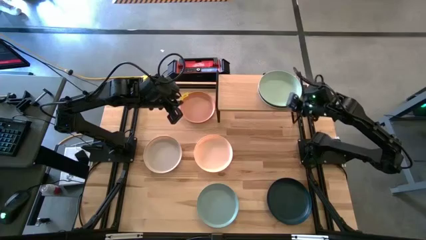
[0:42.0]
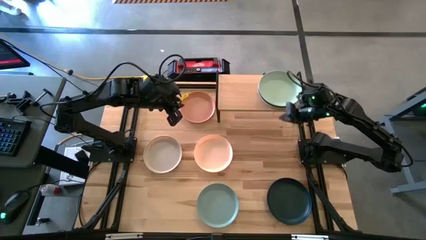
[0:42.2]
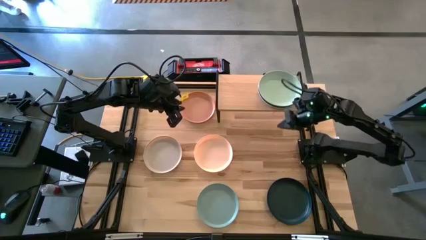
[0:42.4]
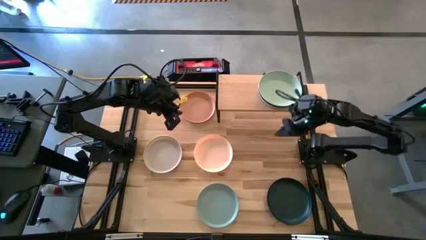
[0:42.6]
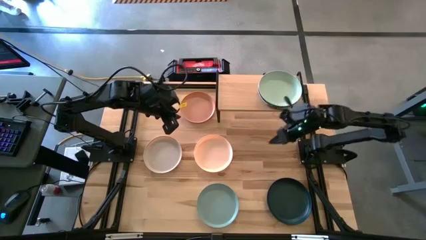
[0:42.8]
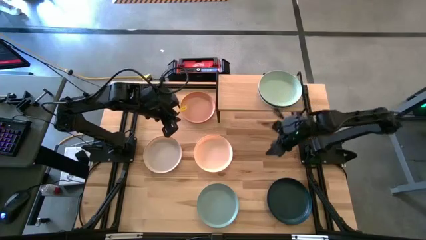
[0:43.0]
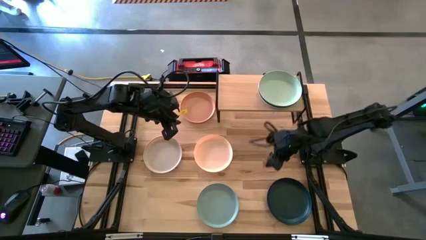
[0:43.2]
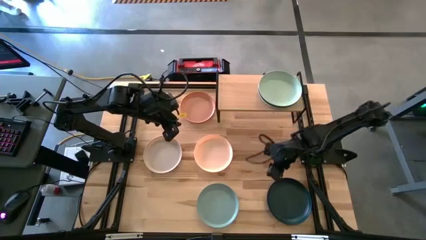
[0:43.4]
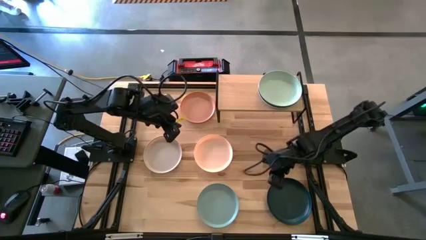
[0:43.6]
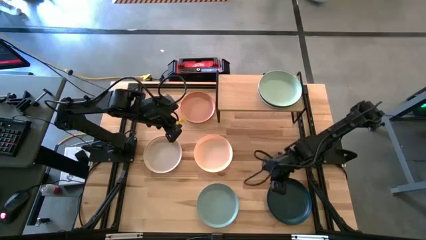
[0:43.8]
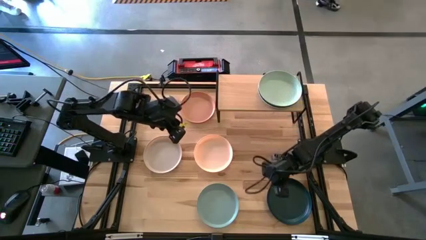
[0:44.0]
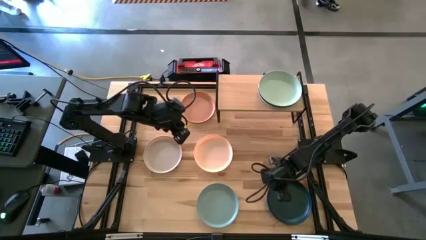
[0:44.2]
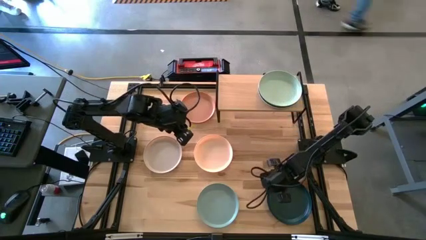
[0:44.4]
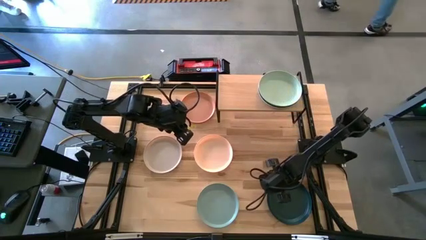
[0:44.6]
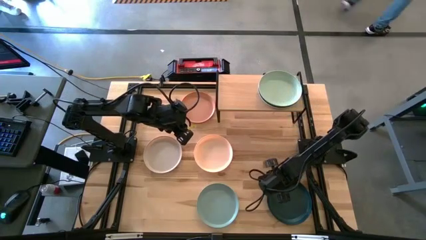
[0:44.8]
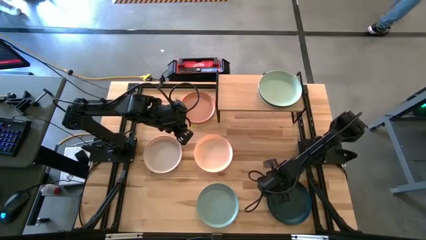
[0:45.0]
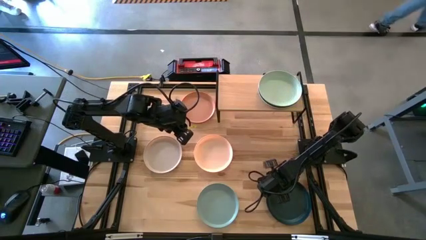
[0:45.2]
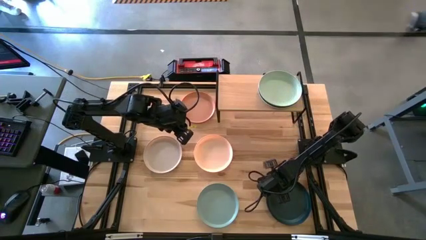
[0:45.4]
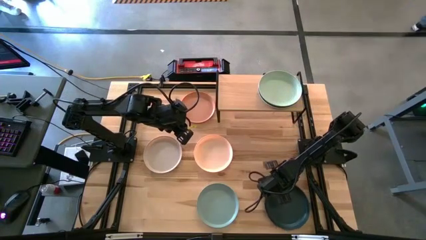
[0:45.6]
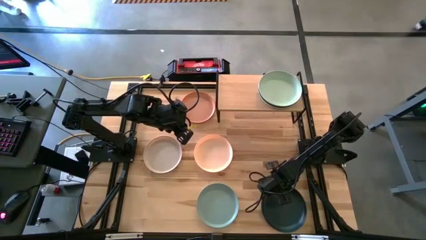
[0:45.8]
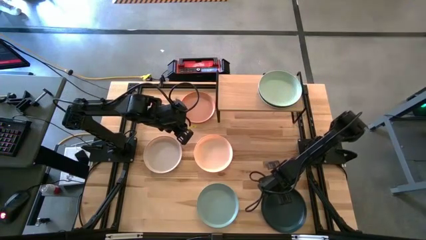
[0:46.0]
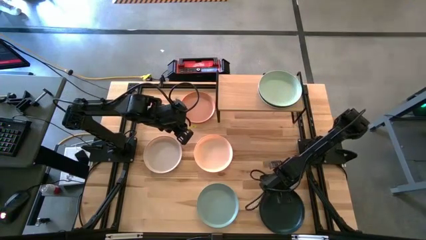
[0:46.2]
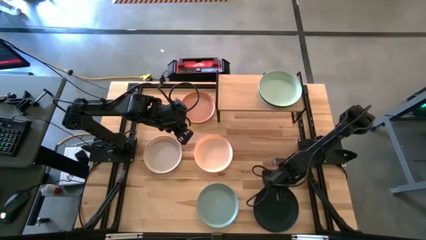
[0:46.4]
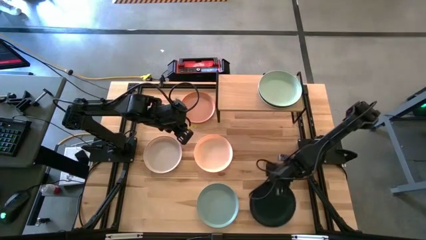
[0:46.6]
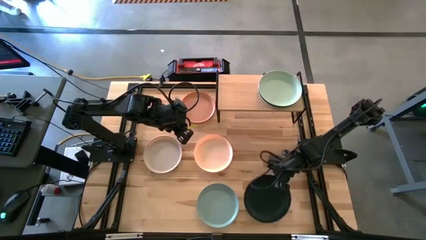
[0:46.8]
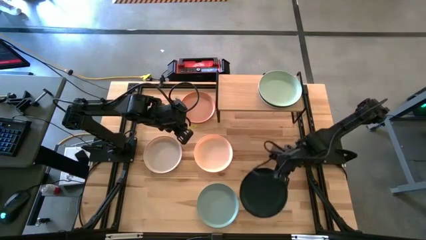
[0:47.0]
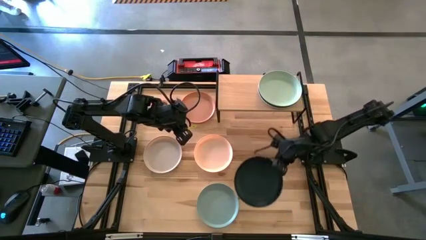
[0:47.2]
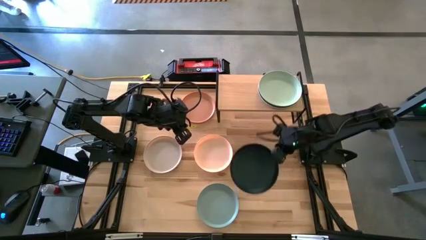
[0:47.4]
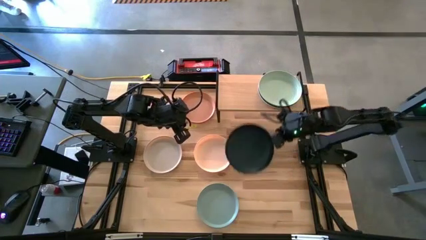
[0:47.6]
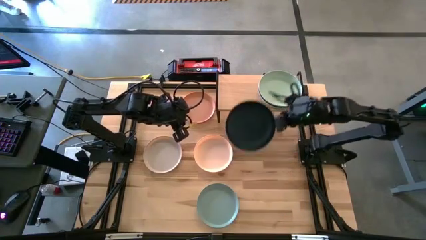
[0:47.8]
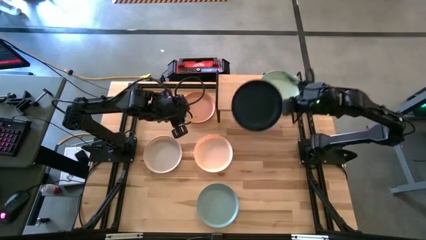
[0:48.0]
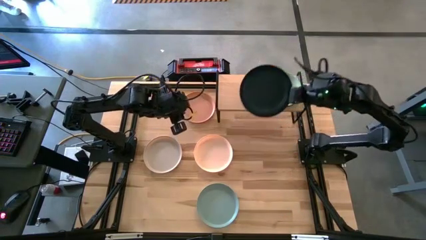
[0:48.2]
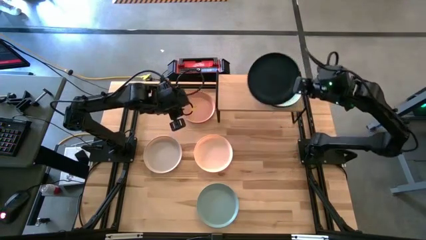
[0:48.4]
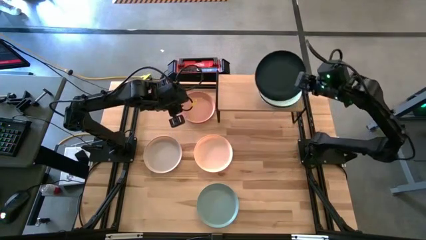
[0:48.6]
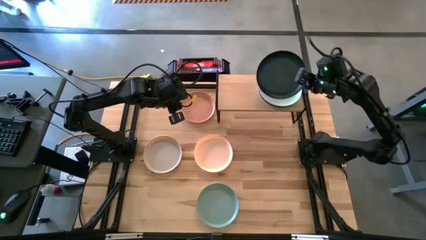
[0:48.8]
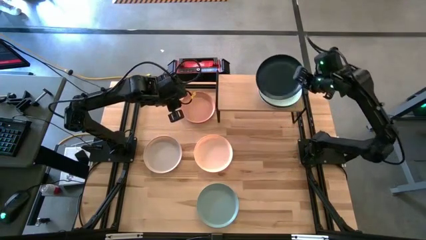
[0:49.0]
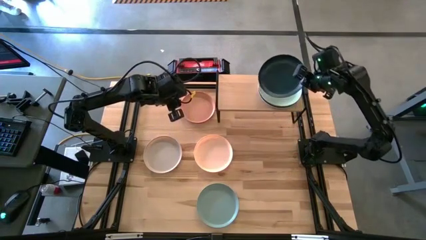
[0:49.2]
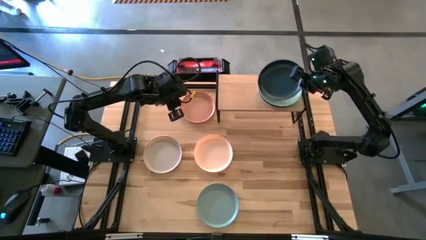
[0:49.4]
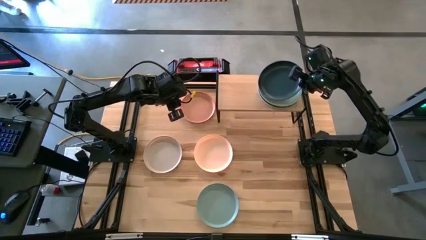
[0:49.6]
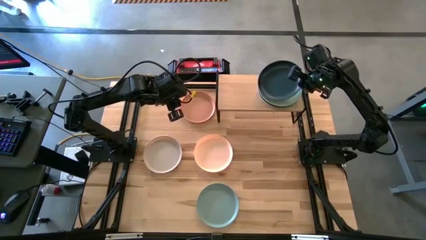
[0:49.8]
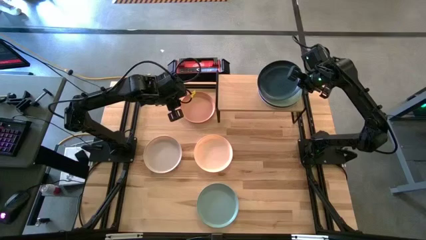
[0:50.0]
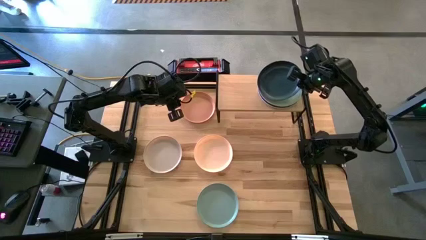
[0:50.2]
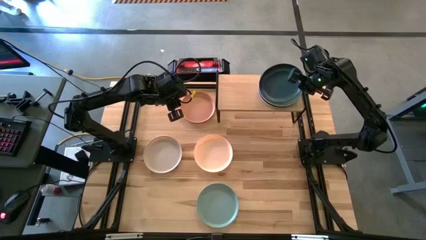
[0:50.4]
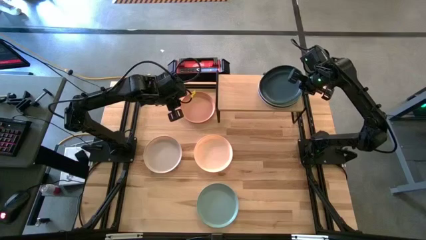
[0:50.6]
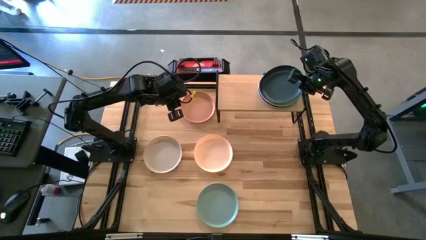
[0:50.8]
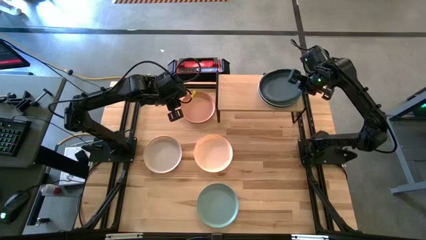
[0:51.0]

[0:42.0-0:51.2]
Task: Place and stack plates onto a shelf
Stack the dark green plate on top of the light green plate on the shelf

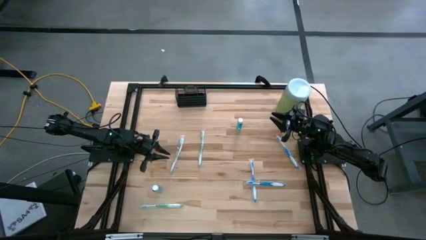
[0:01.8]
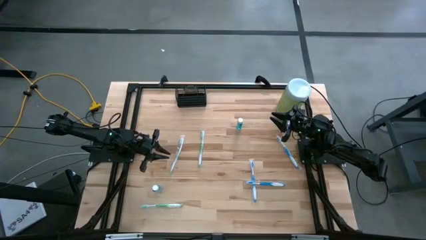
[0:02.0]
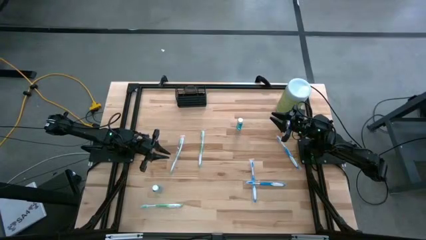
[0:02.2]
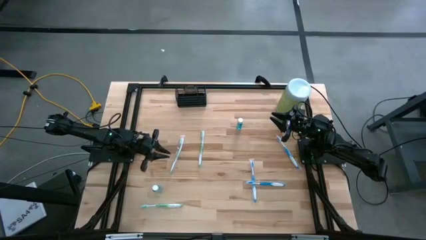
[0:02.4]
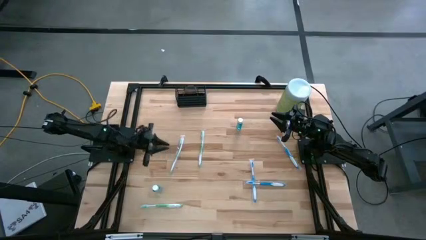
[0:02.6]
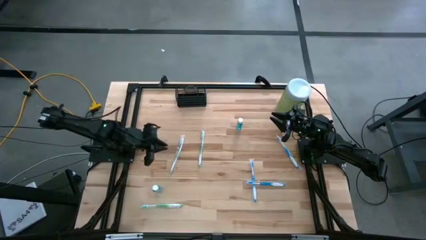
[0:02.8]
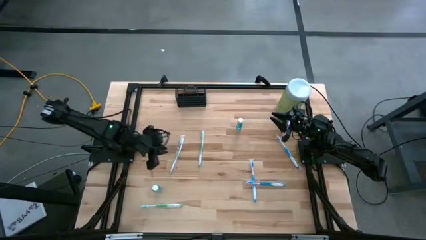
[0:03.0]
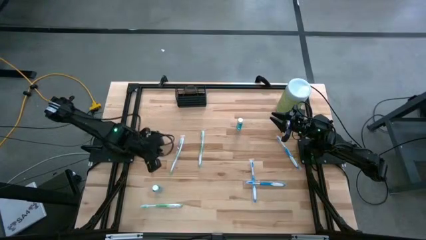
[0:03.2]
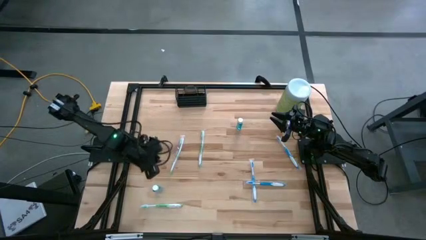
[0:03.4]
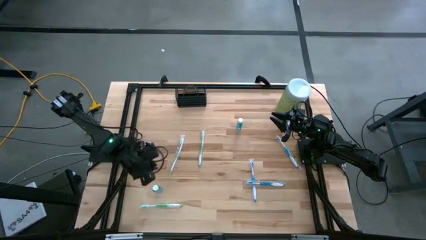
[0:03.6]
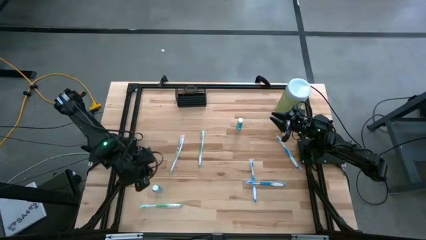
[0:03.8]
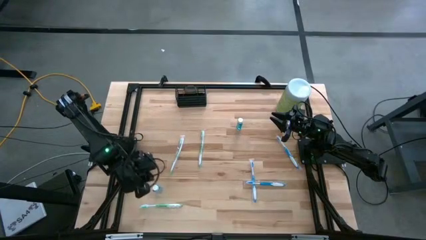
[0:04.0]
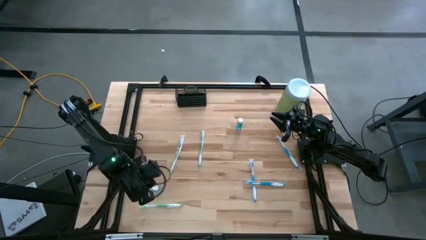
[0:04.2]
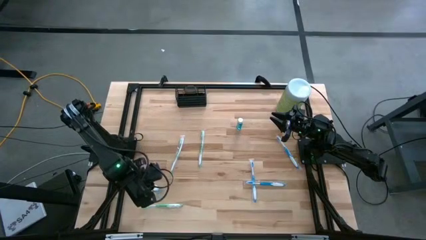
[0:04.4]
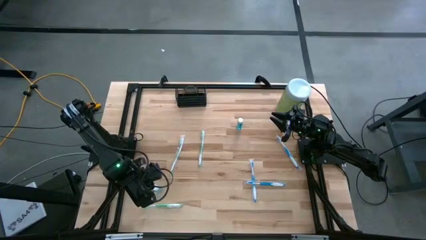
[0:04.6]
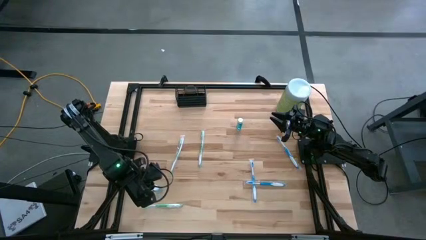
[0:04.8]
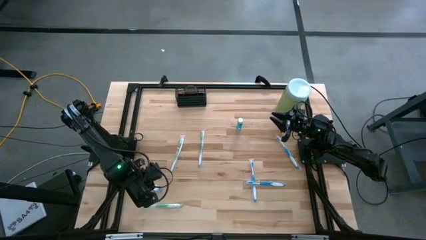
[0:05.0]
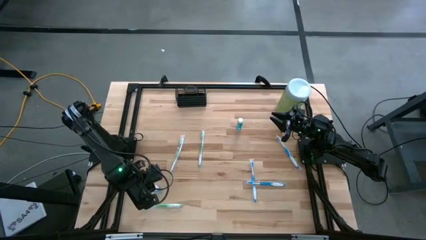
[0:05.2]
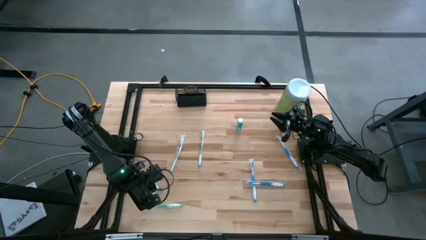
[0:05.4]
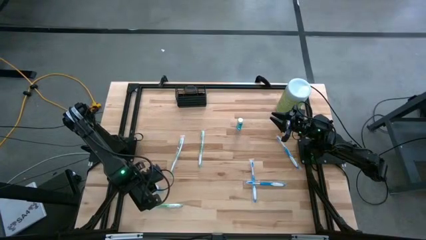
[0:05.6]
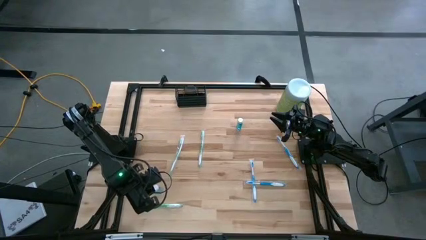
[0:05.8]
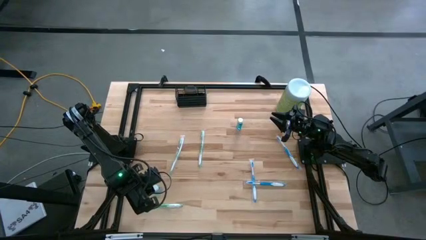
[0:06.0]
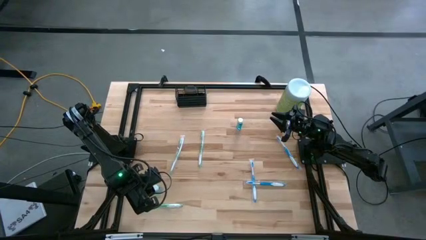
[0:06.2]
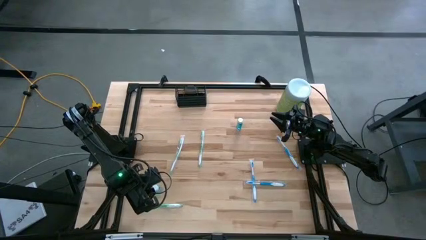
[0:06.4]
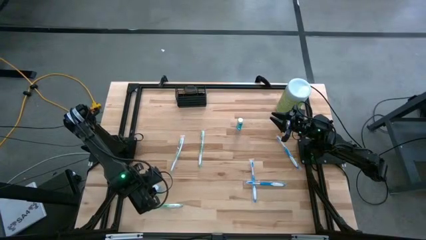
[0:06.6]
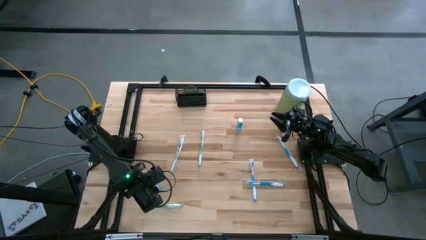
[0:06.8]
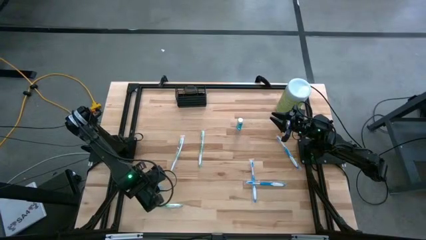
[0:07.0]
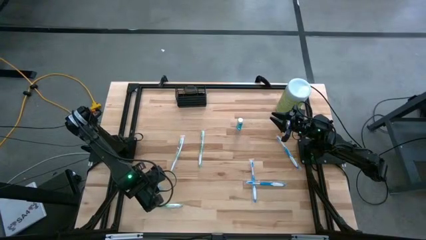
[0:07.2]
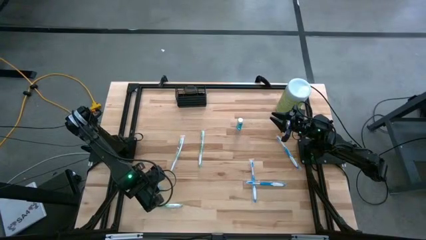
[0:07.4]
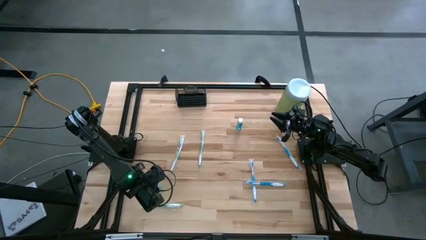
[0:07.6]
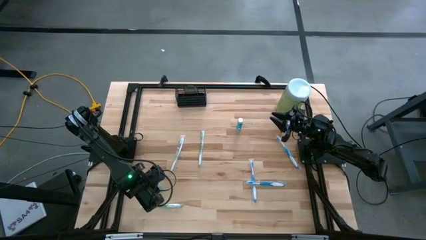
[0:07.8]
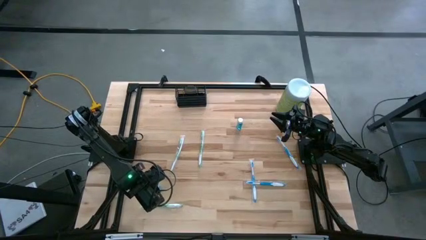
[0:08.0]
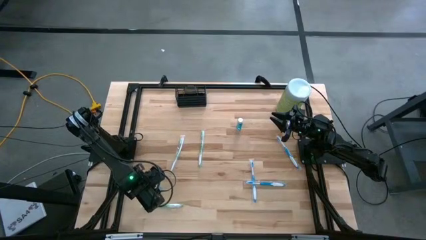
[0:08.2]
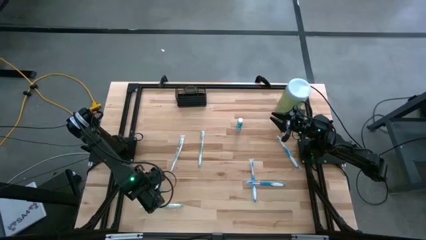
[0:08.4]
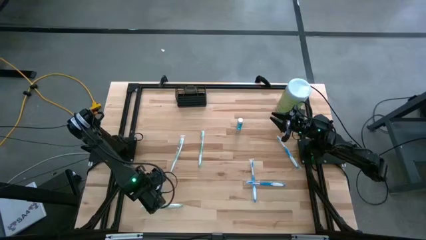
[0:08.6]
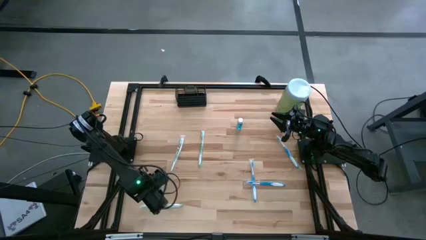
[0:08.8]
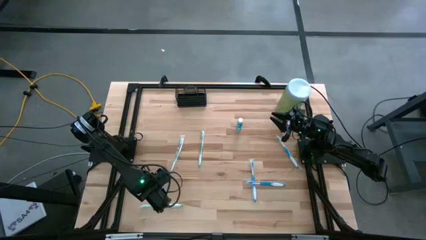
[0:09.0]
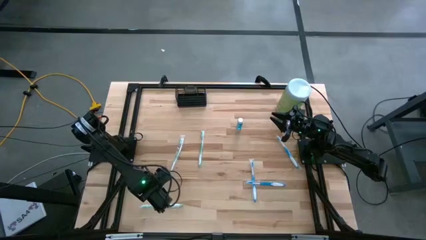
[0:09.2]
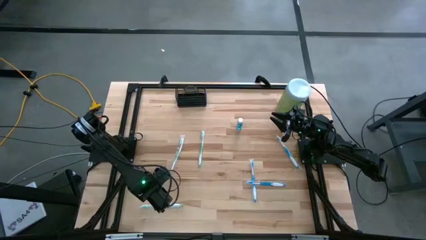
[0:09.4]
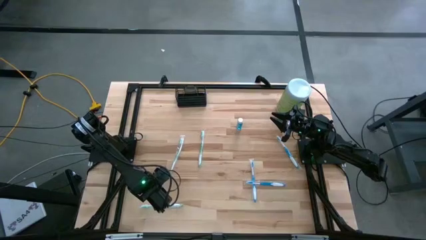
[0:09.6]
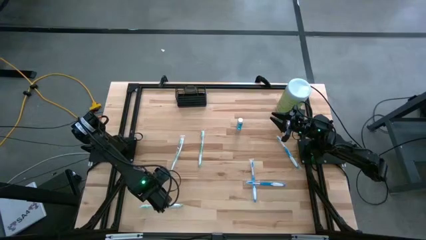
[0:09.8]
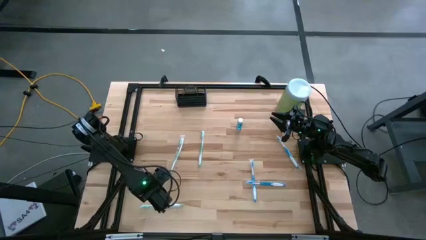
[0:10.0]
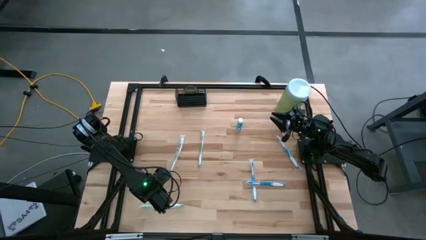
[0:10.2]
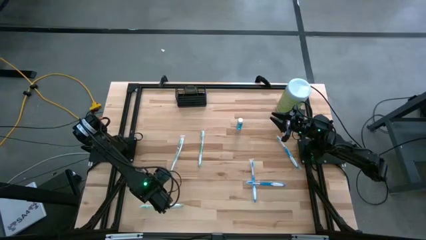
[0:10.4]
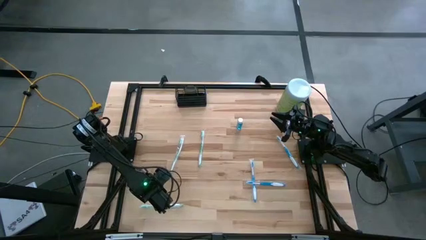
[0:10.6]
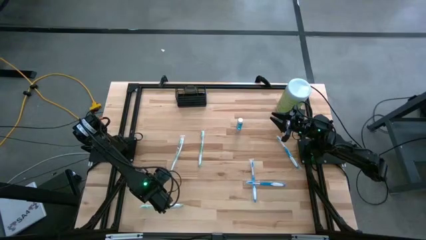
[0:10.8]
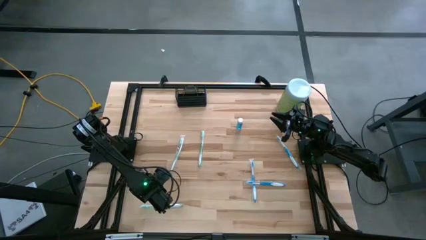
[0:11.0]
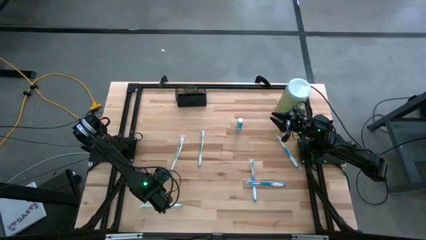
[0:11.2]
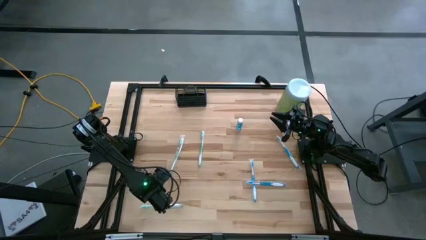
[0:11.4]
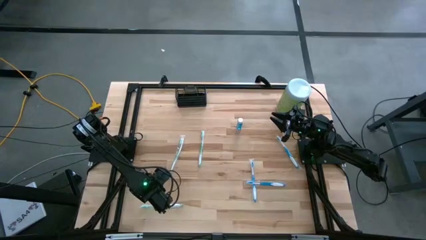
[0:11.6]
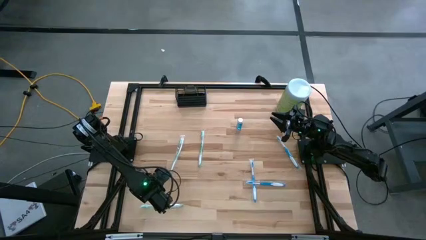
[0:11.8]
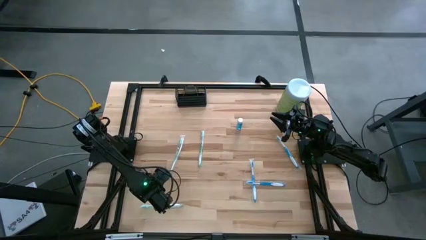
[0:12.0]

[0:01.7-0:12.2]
Task: Pick & Place toothbrushing station
Put the bottom blue mouthwash bottle into the wire organizer
